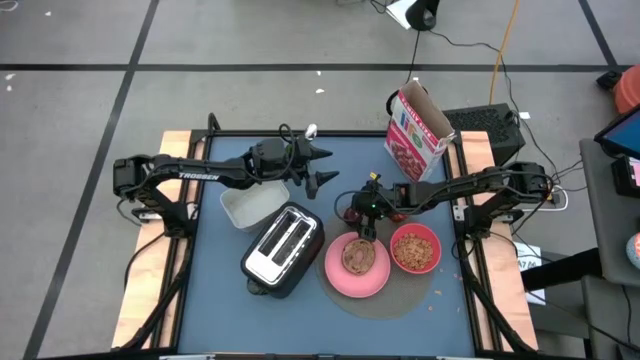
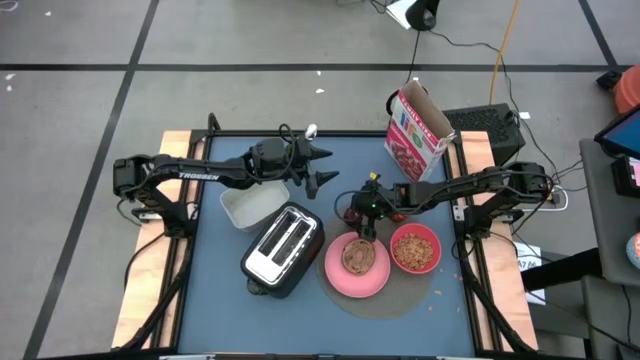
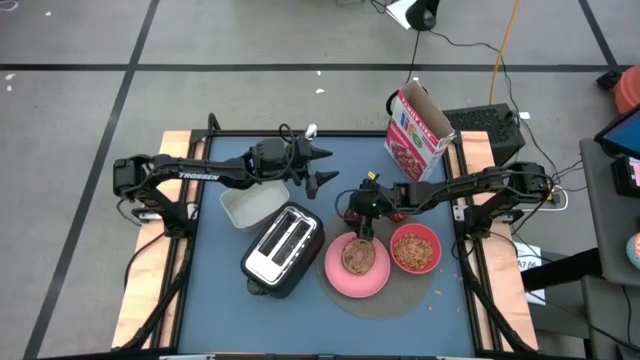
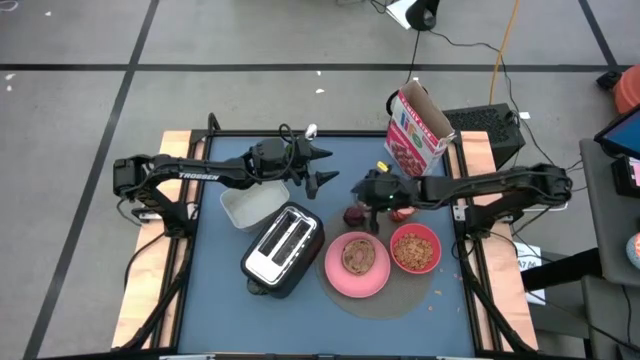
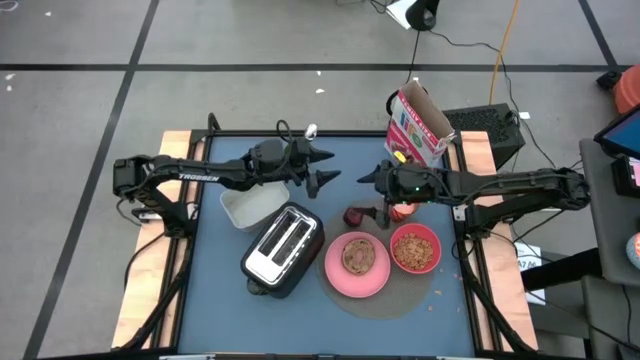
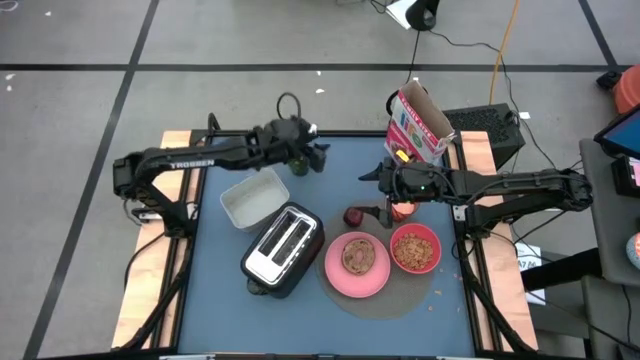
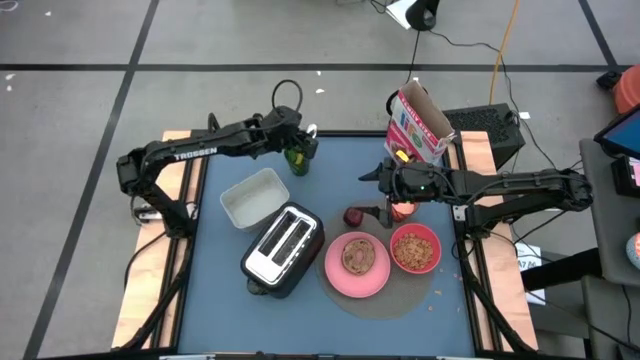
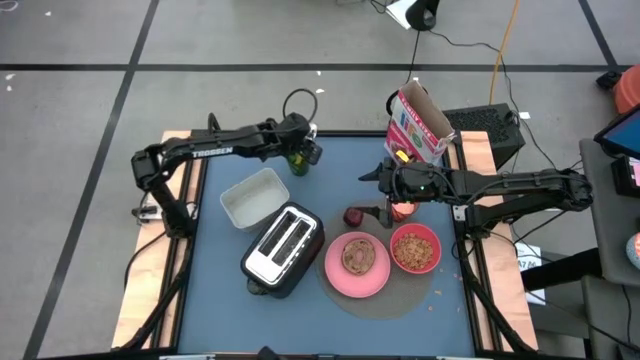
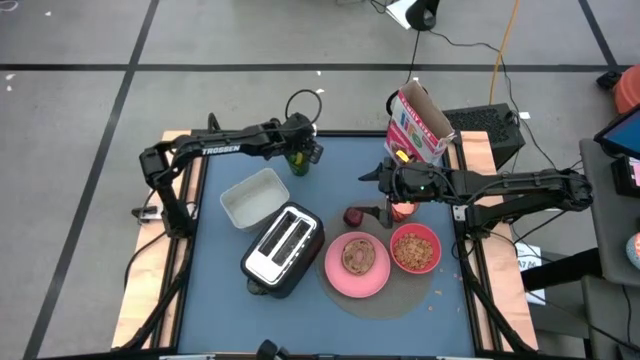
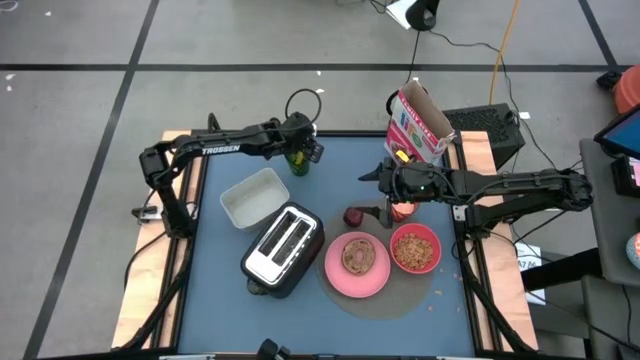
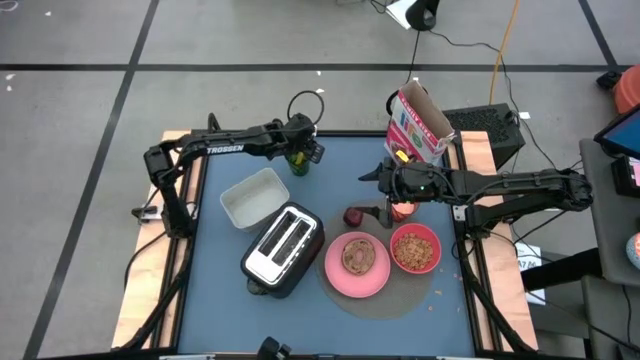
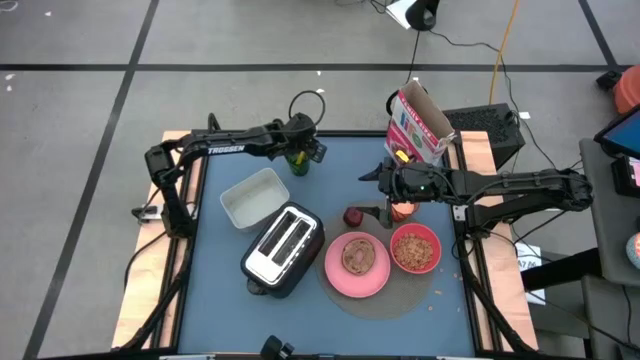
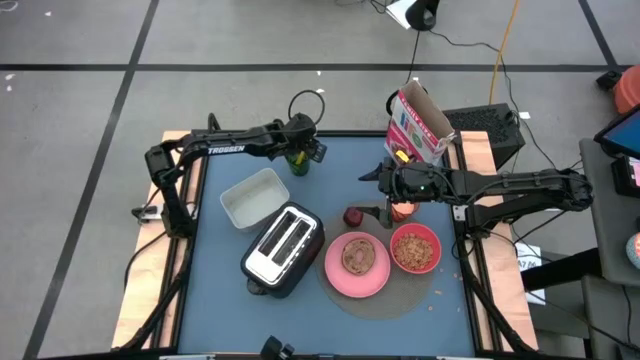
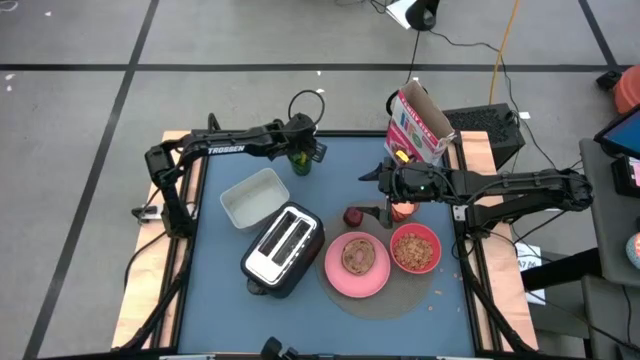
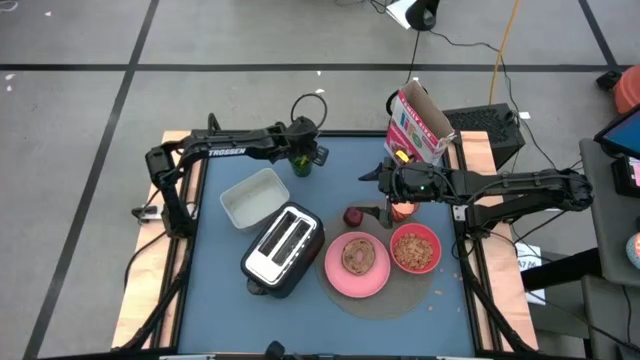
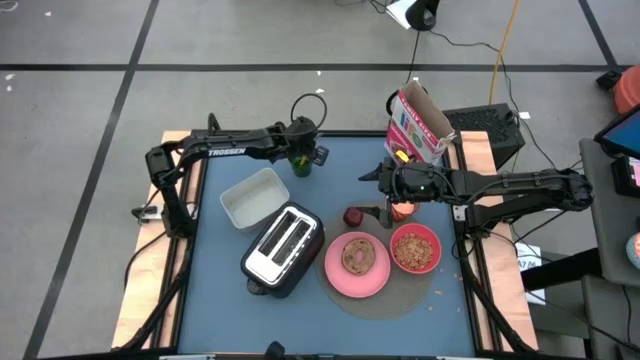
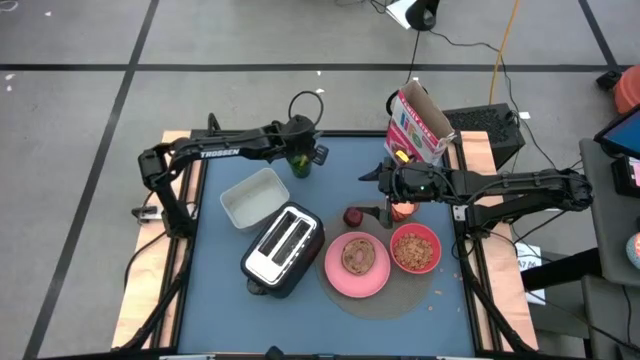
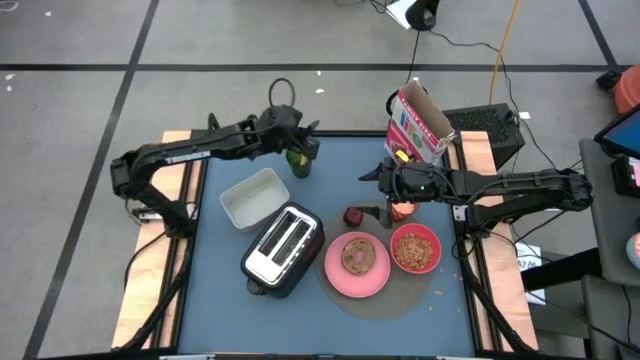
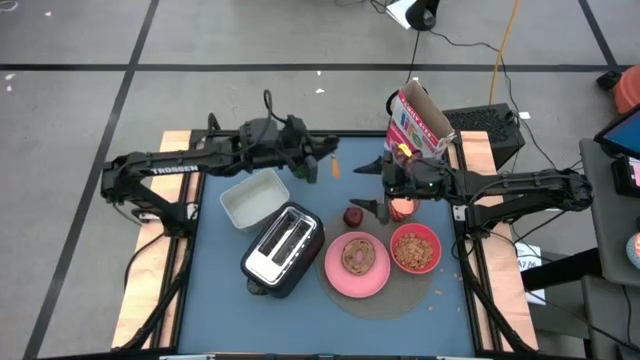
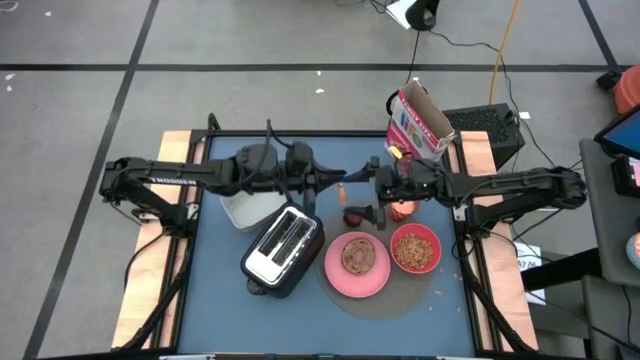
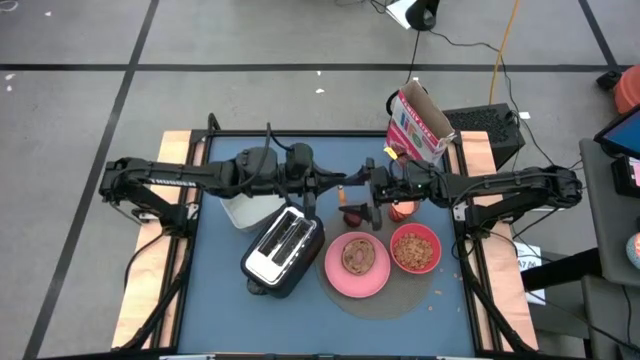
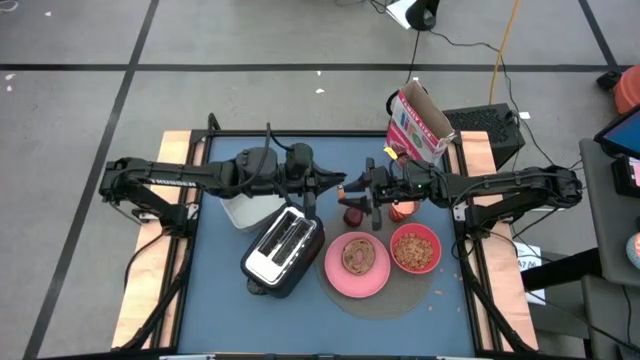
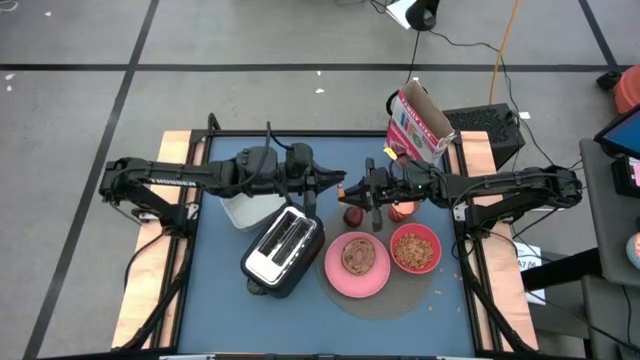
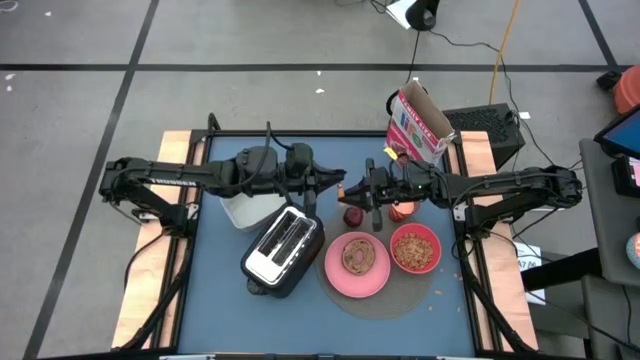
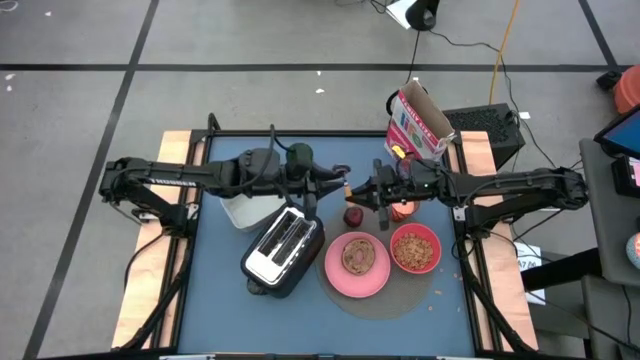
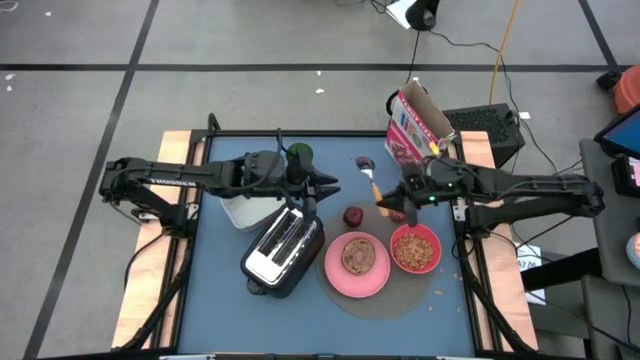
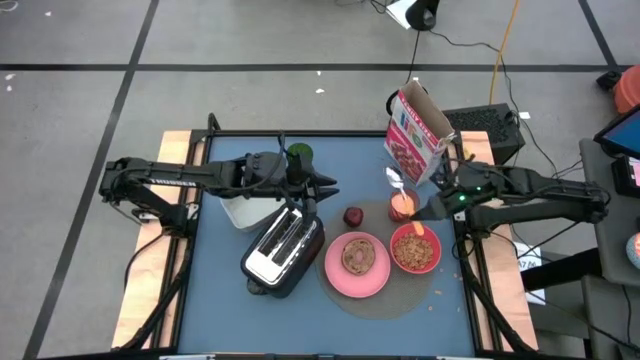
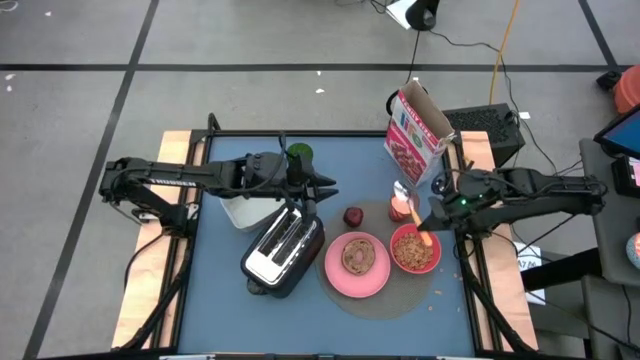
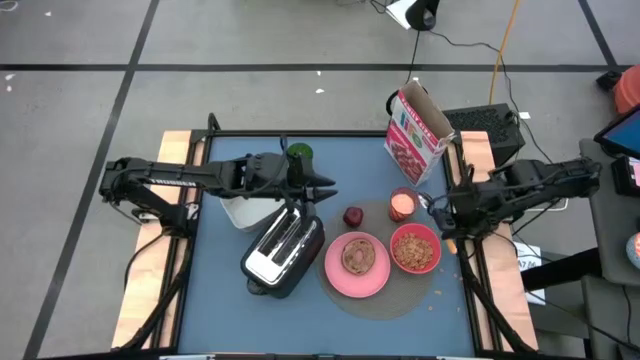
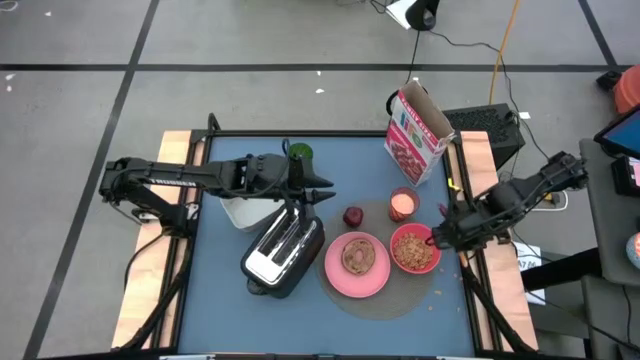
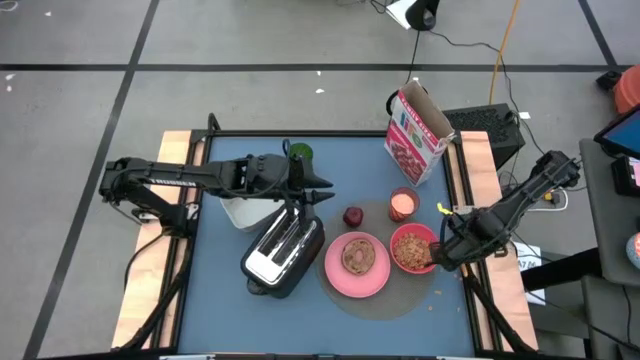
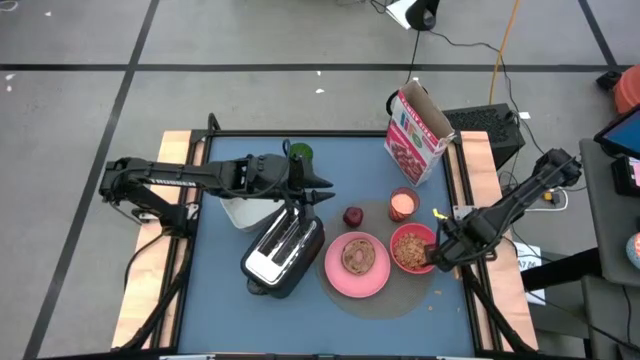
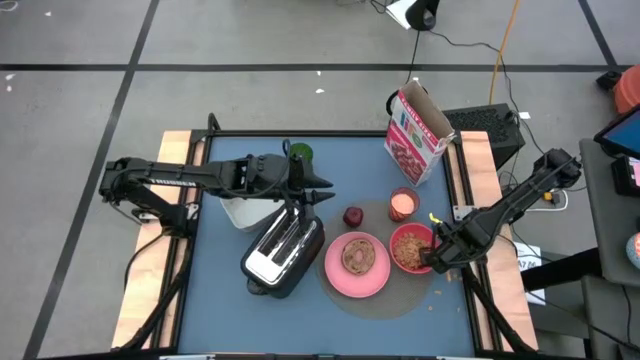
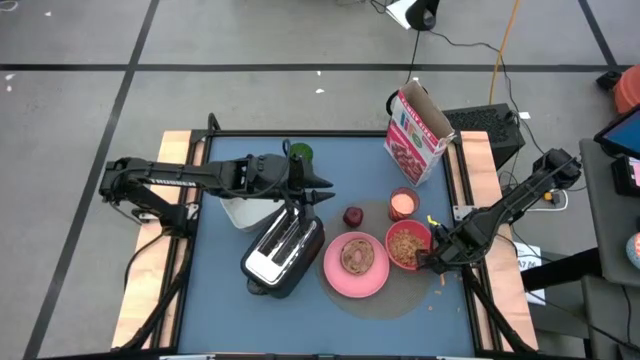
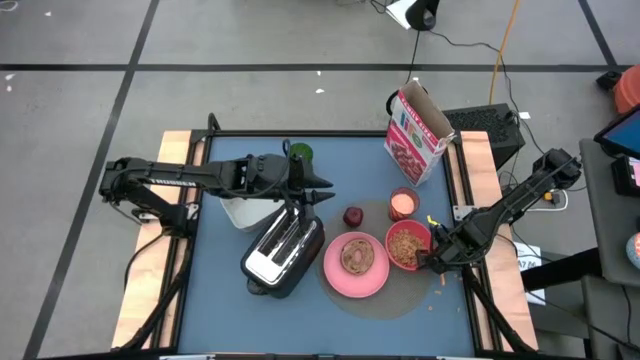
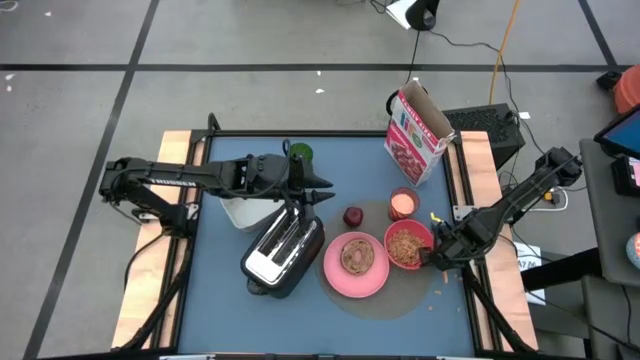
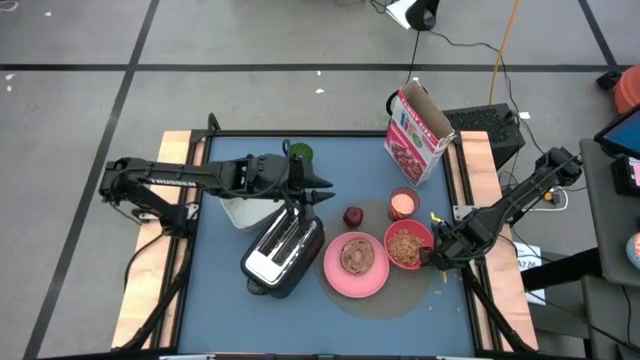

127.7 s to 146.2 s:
Task: Arrange a breakfast setting
Put the yellow spoon to the right of the red bowl

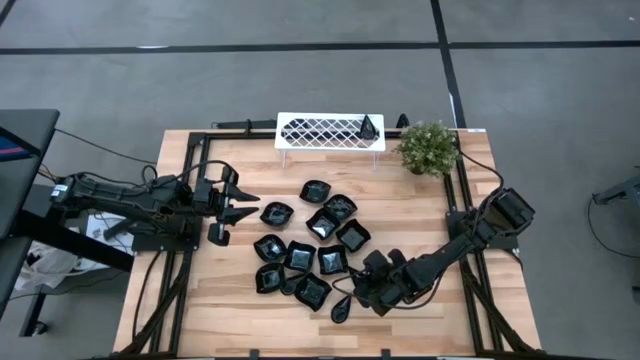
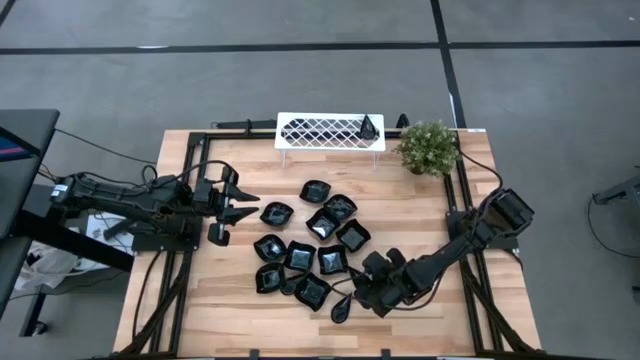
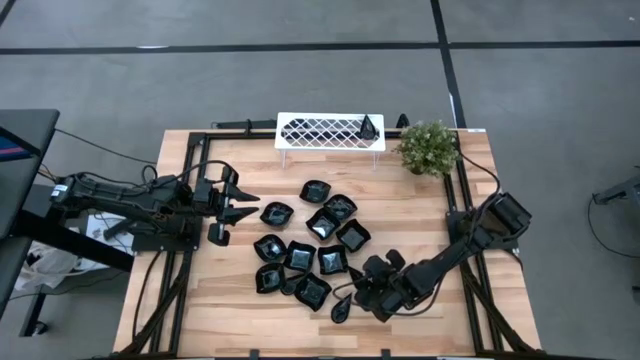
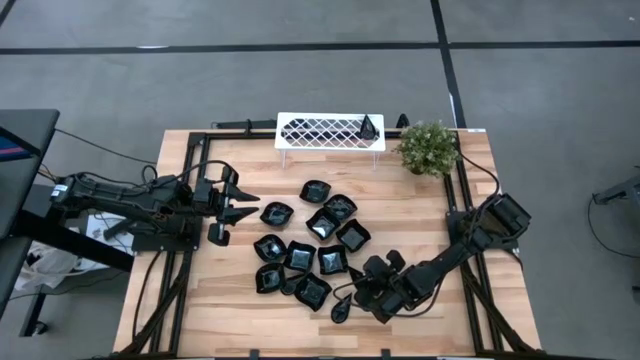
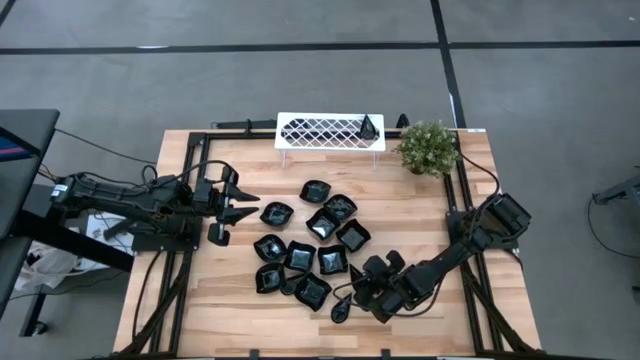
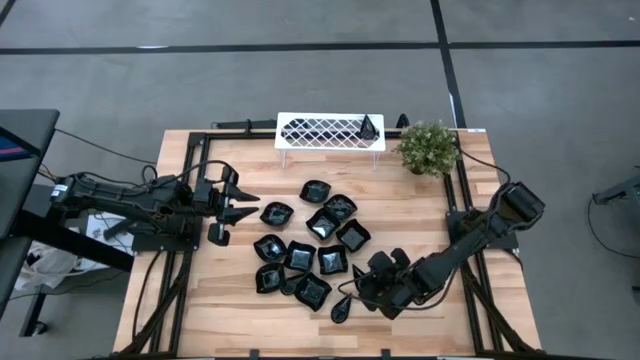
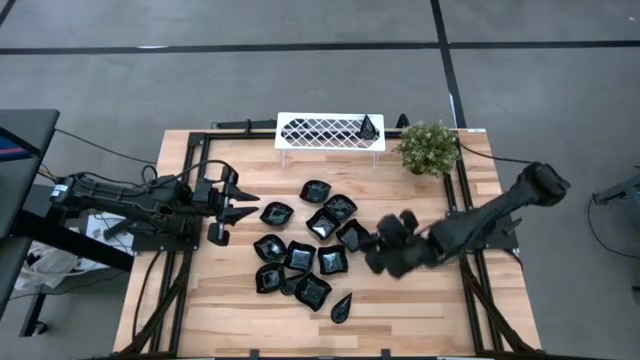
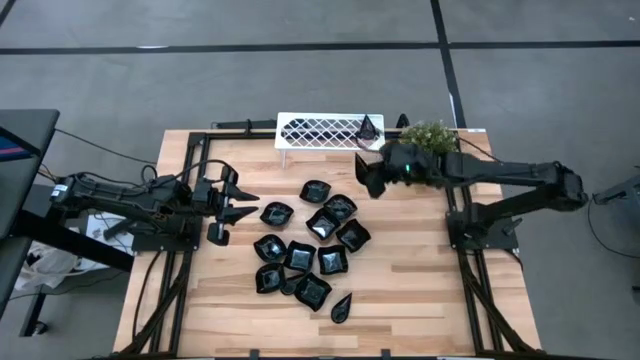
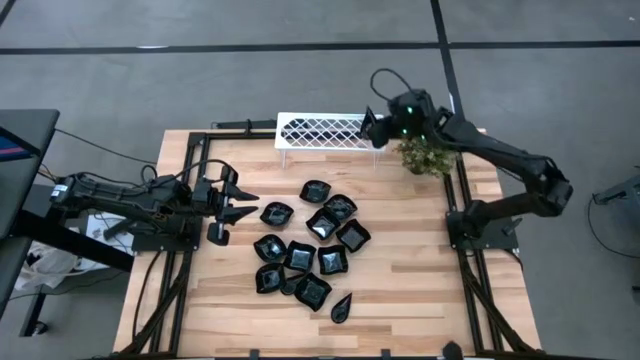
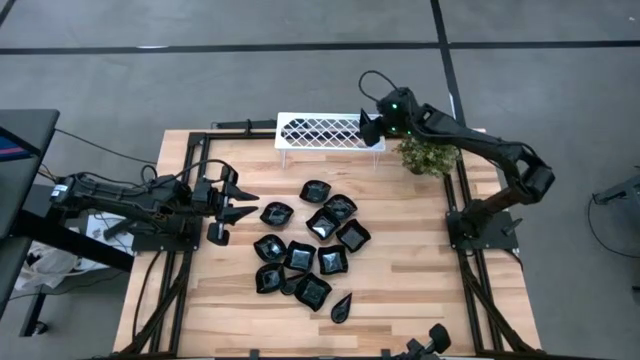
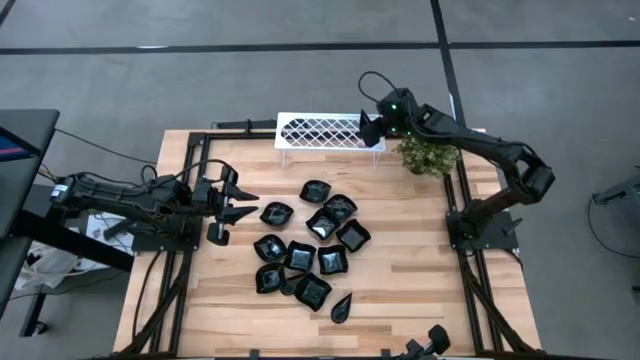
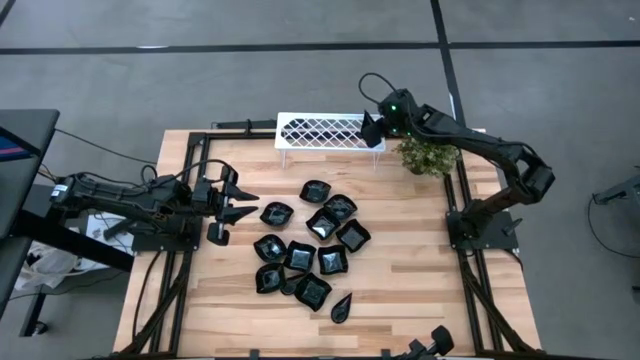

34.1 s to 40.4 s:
Task: Pick & Place Mini shaped plates
Stack the top right drop-shaped plate on top of the drop-shaped plates on the shelf
